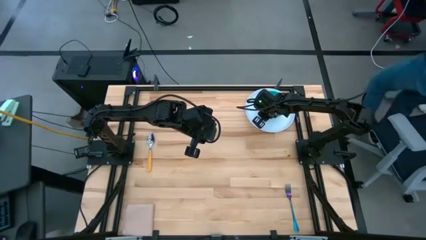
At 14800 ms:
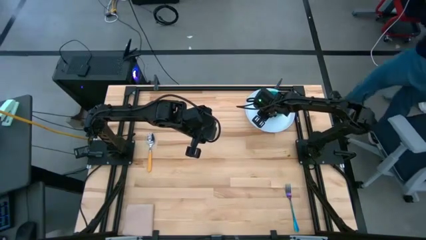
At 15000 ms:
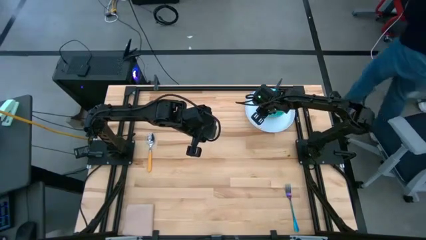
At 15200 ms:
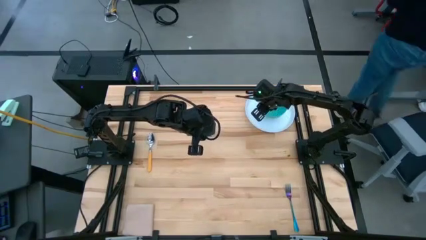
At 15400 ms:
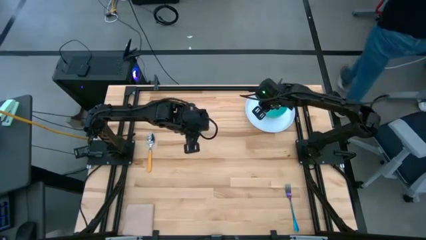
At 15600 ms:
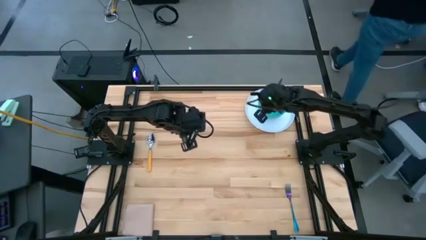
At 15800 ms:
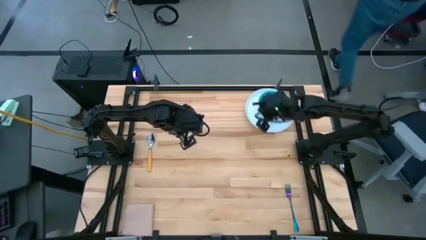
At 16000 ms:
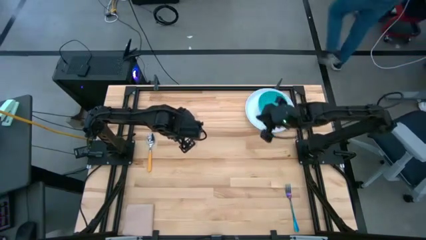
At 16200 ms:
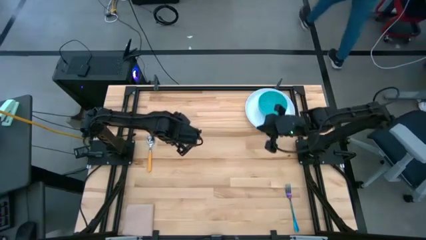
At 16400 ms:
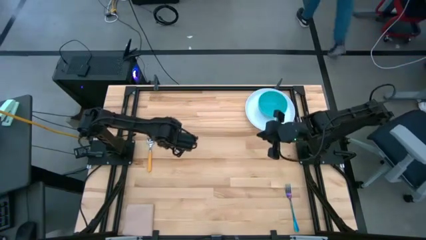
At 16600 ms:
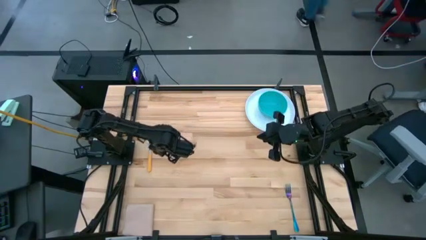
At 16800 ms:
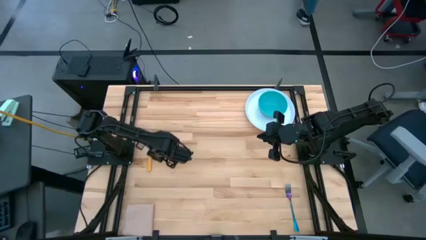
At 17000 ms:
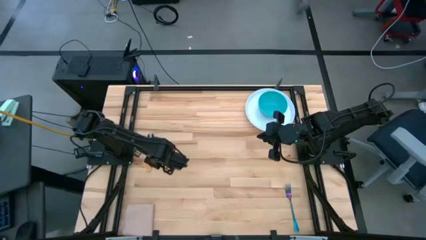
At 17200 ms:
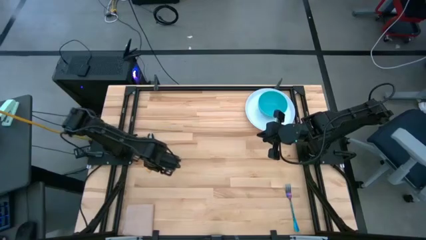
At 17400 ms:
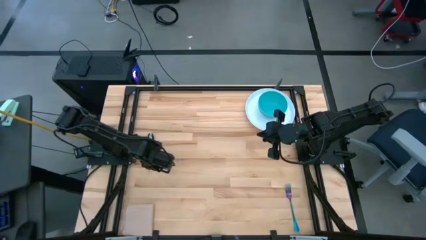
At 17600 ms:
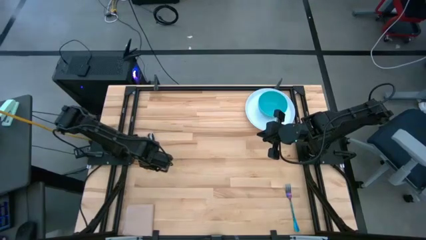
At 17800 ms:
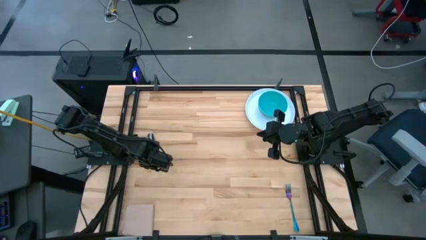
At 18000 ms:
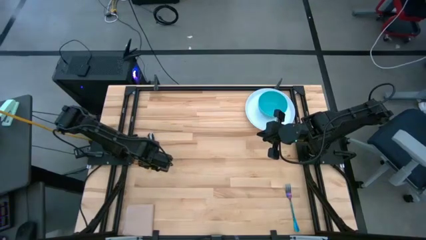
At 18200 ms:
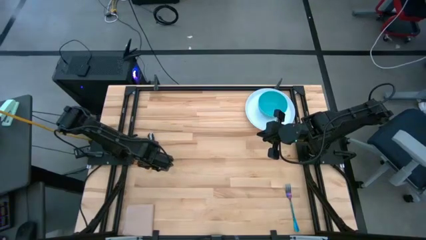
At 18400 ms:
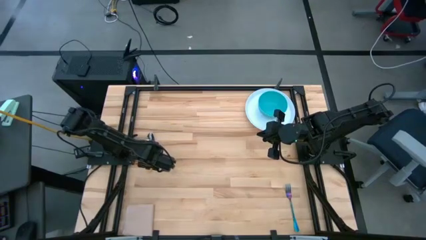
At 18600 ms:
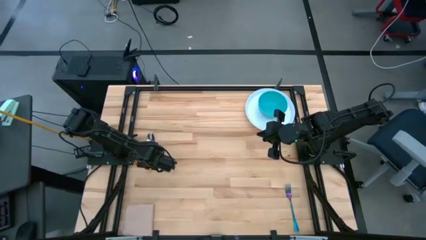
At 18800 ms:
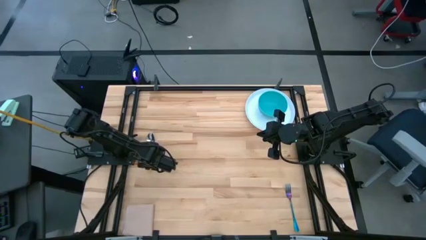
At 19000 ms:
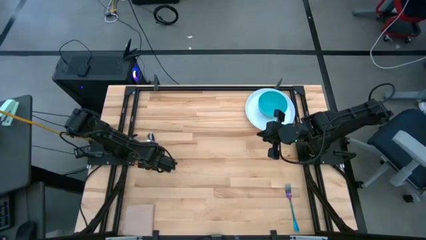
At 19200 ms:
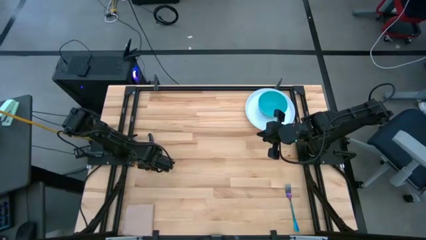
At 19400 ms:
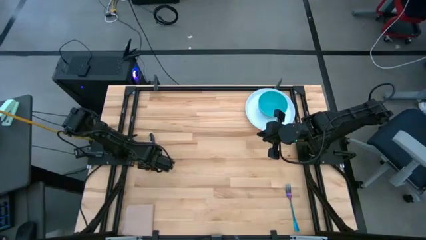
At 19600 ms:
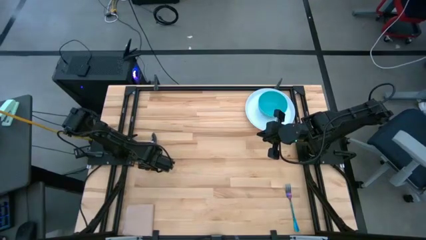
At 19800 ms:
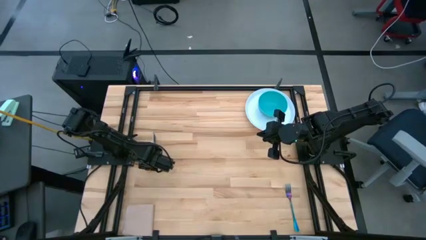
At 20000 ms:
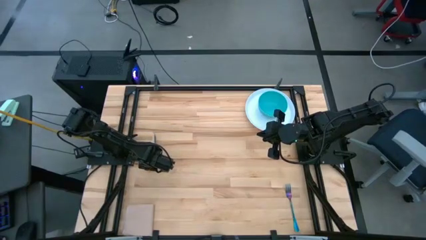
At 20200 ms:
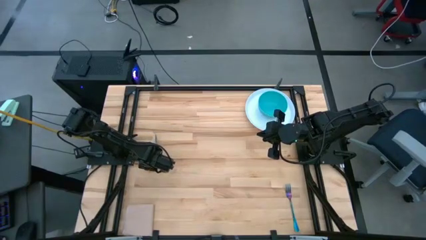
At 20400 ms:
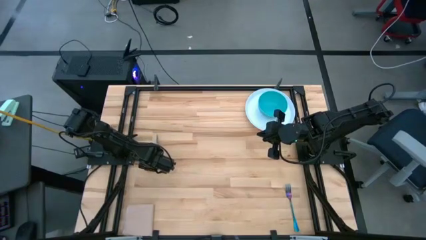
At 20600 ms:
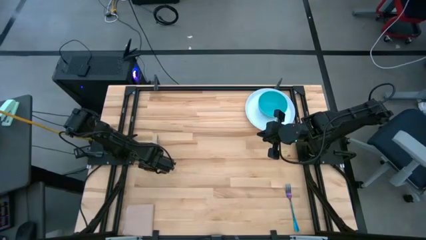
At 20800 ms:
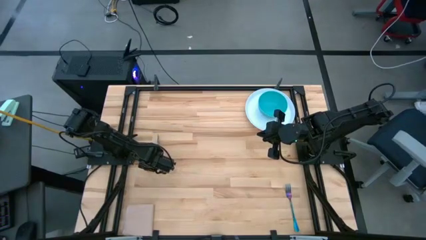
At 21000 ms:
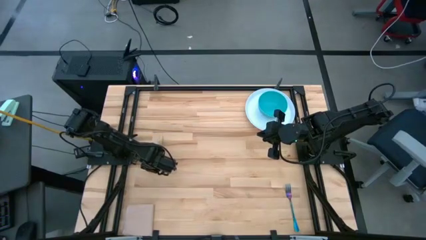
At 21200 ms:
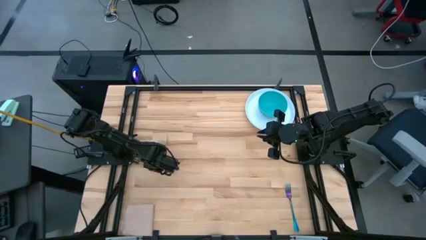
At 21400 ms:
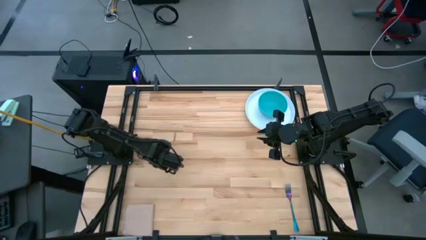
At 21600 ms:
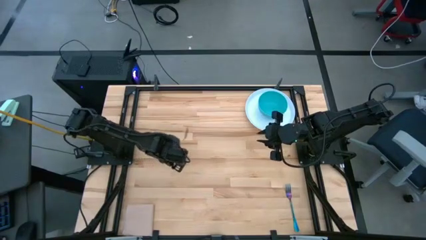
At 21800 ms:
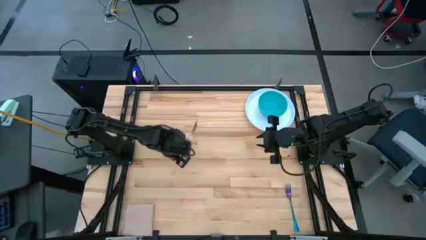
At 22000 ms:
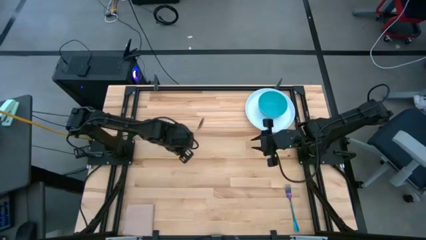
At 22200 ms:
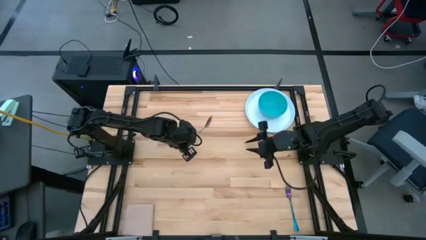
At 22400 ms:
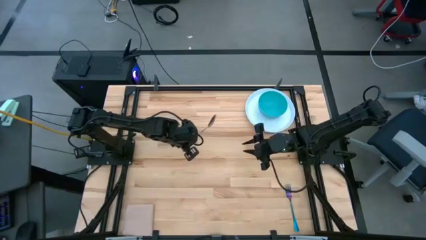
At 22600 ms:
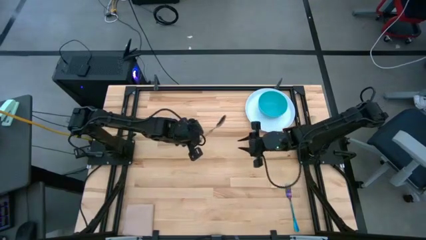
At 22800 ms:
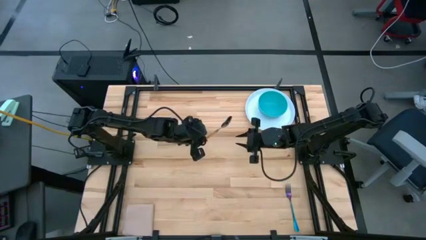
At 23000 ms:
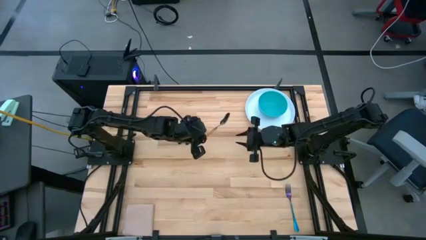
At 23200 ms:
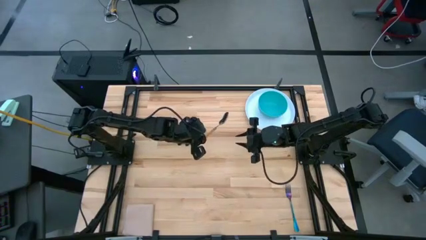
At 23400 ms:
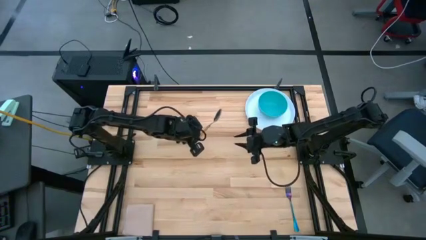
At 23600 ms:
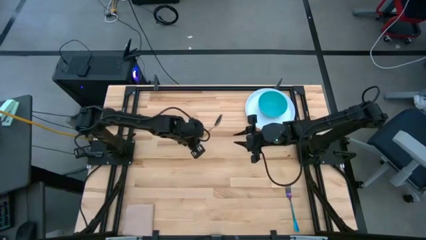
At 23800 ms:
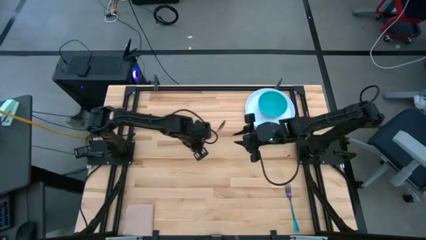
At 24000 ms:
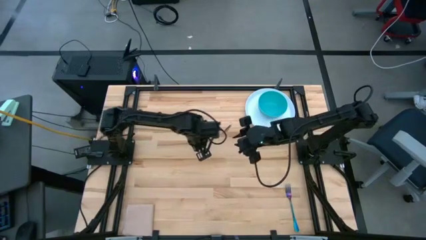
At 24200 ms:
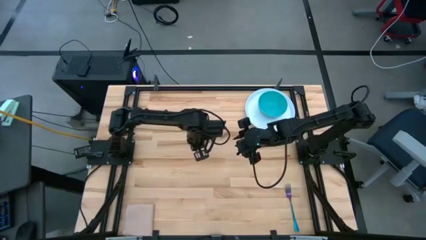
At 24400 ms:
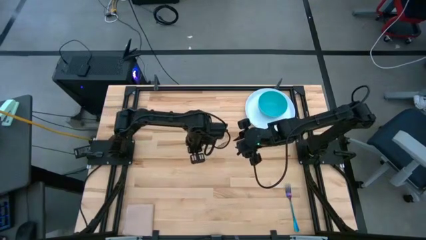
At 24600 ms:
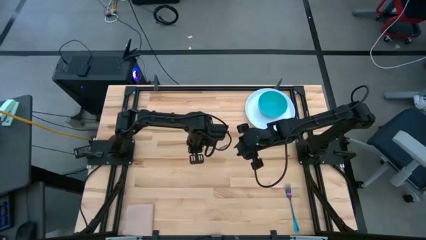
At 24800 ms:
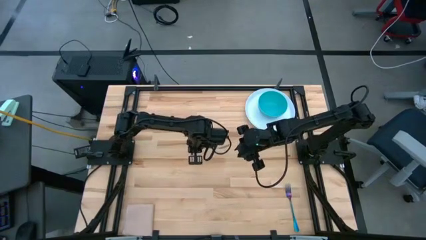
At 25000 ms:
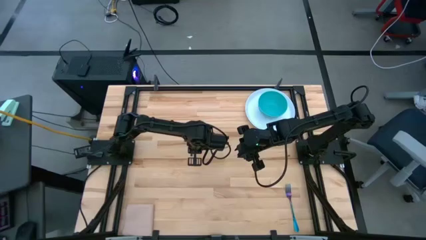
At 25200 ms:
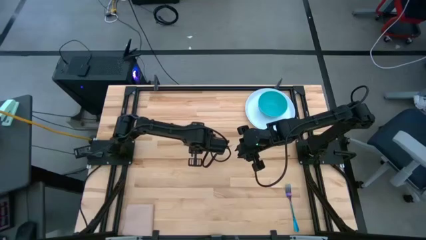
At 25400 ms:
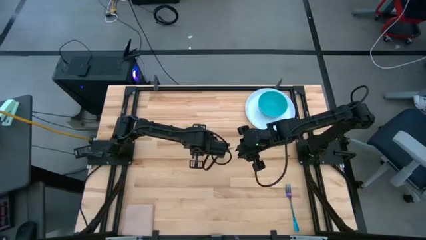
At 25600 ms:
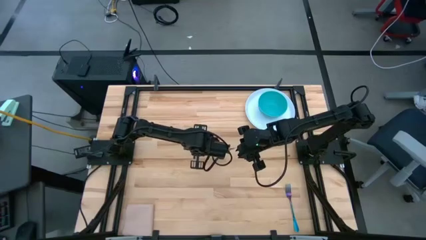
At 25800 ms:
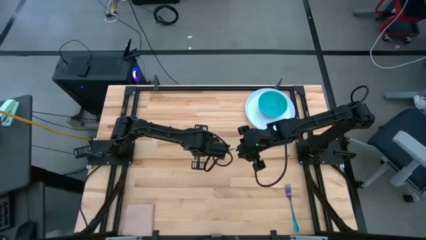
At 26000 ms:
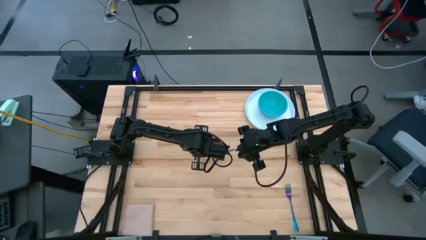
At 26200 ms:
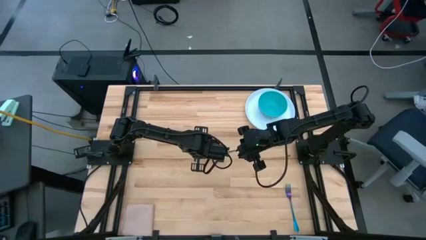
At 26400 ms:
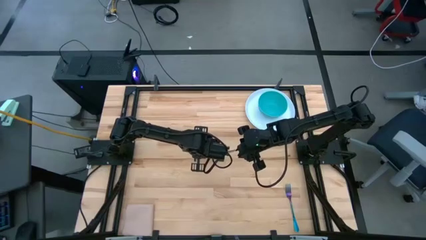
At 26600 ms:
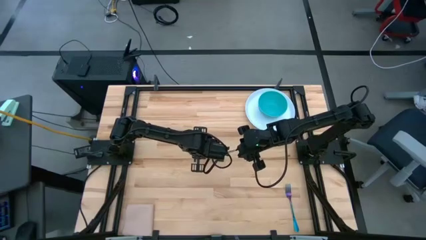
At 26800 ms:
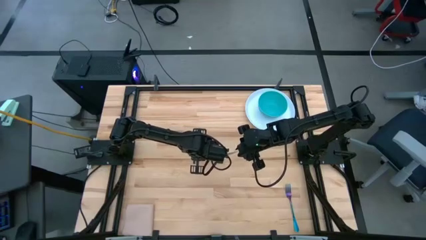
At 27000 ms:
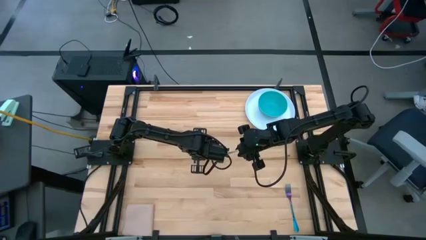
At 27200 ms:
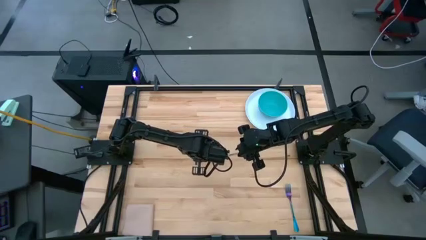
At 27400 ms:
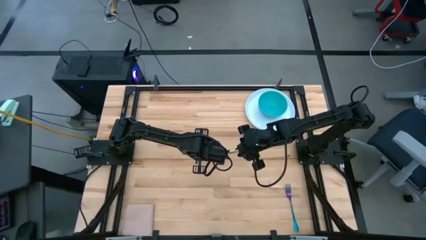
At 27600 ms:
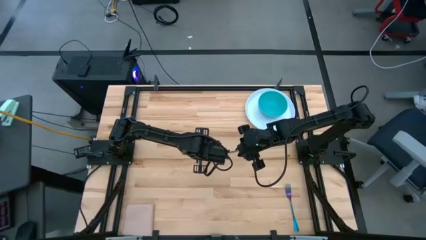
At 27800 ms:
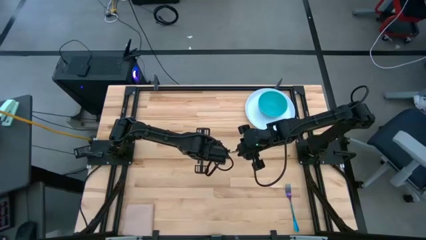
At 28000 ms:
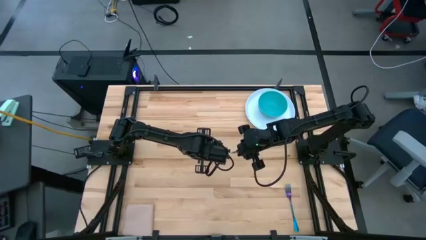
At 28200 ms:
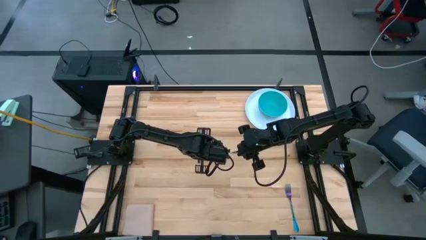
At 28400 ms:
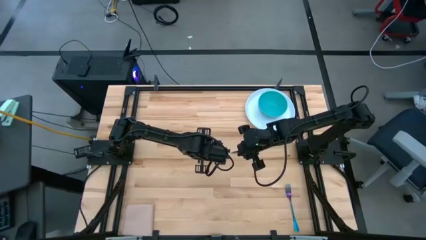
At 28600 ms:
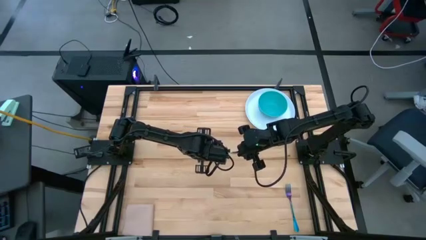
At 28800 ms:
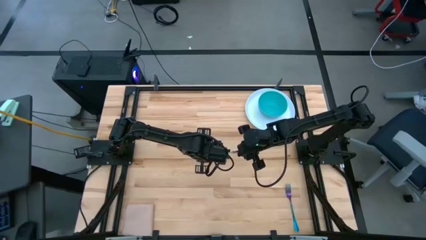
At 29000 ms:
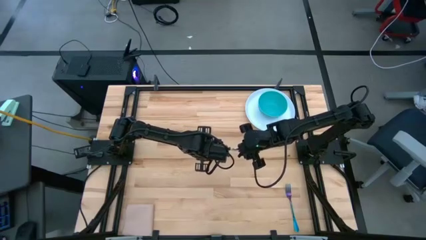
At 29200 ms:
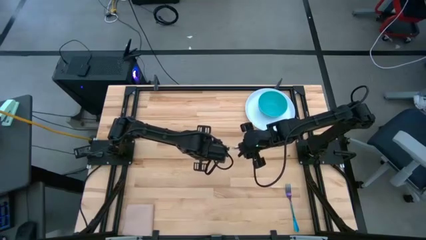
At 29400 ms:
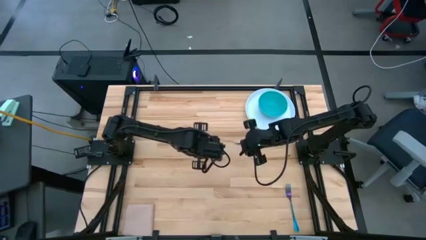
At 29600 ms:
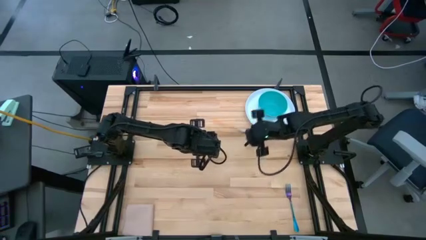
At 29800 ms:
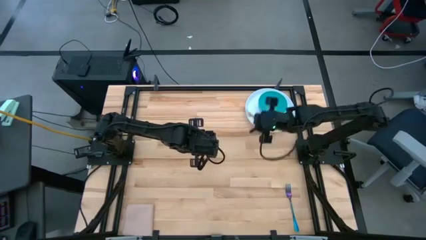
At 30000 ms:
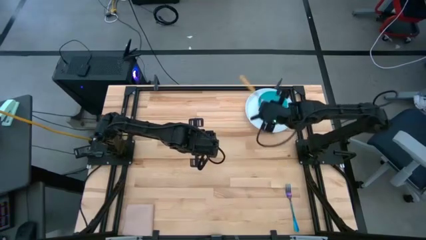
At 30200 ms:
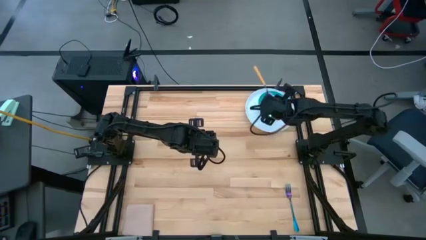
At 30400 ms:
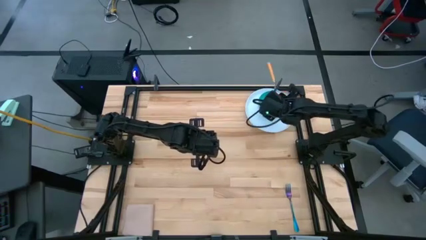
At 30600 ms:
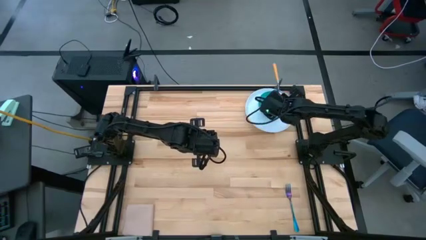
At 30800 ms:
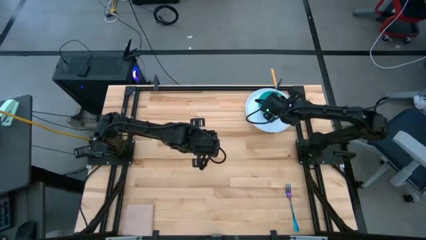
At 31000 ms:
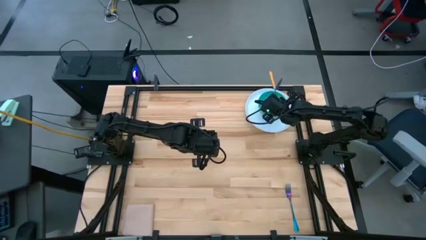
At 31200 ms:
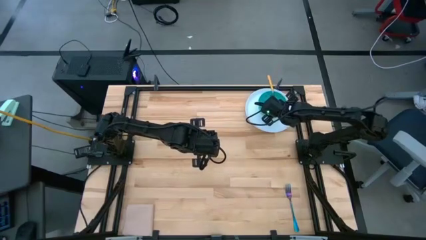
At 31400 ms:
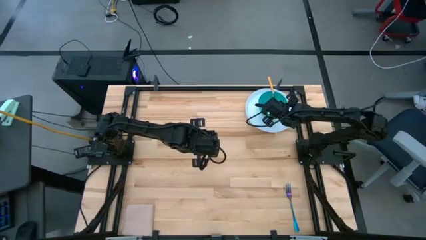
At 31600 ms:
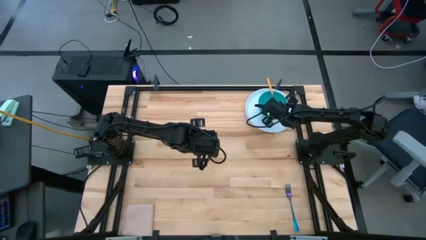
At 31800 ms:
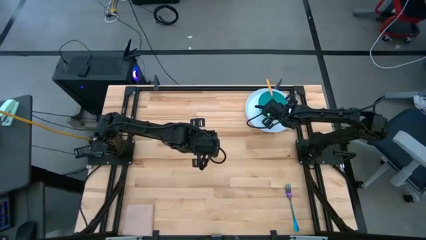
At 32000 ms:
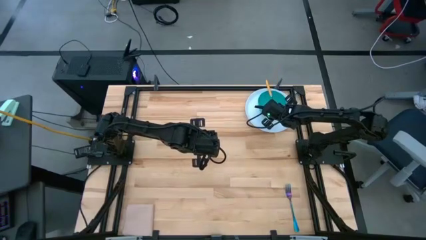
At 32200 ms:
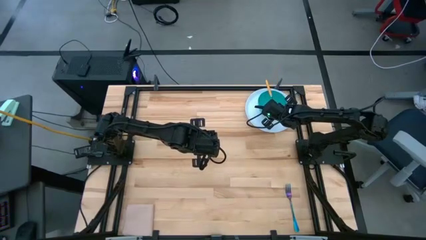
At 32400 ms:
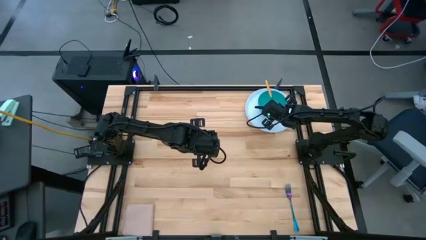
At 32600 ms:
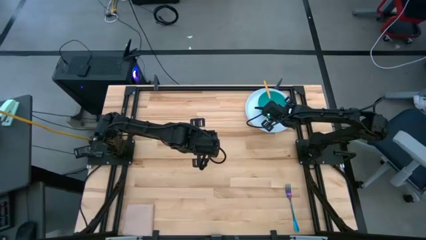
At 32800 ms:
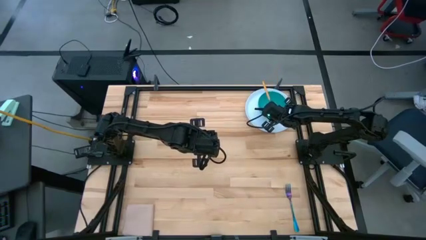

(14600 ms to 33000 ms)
Task: Set table place
Put the yellow spoon into the green bowl
